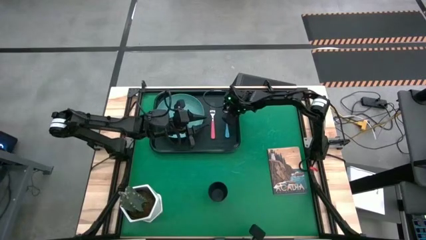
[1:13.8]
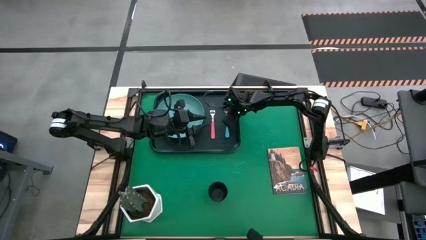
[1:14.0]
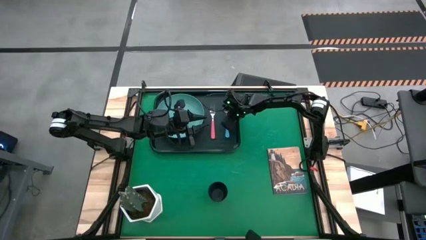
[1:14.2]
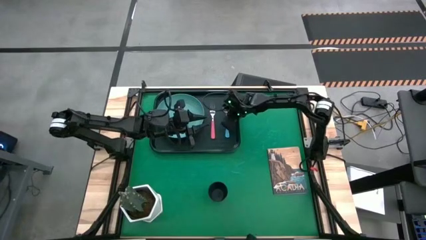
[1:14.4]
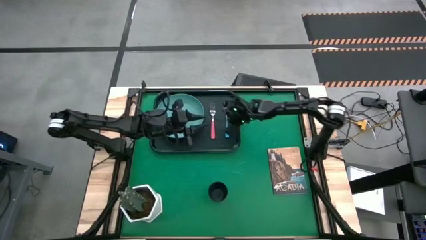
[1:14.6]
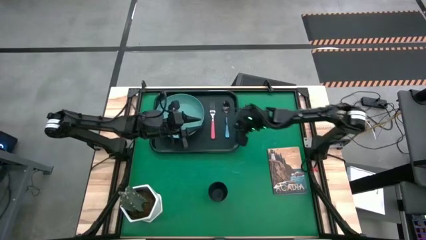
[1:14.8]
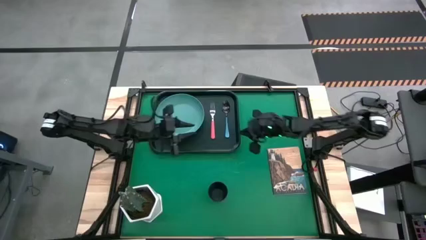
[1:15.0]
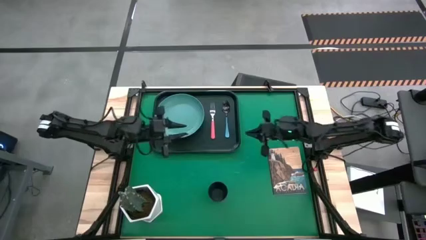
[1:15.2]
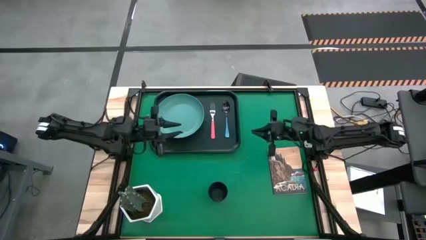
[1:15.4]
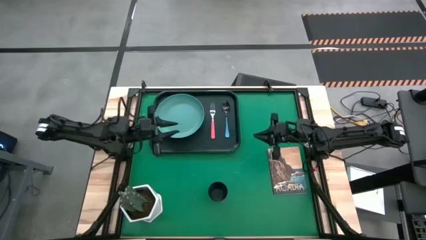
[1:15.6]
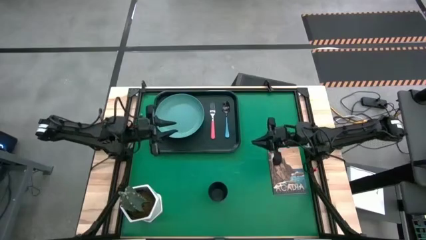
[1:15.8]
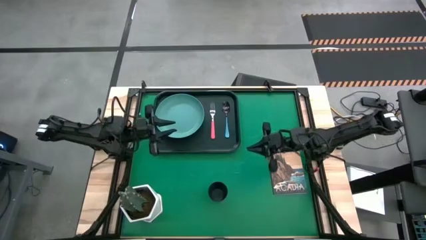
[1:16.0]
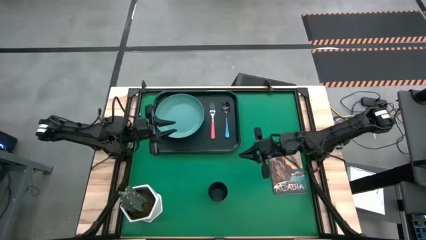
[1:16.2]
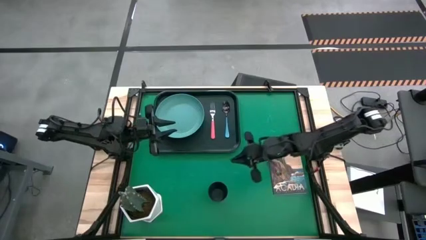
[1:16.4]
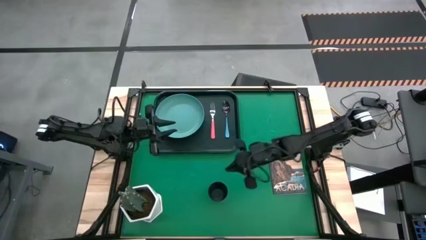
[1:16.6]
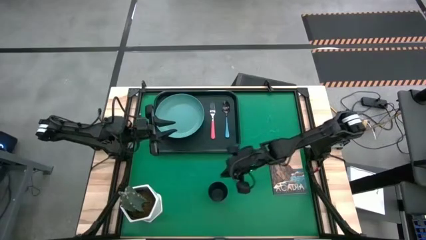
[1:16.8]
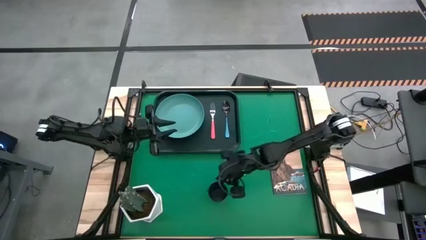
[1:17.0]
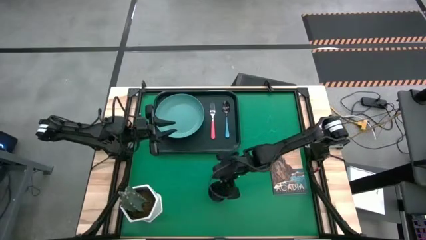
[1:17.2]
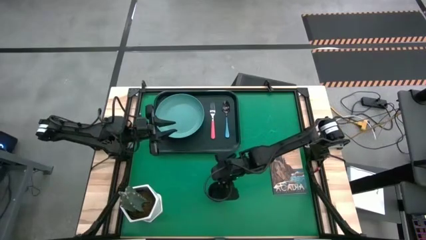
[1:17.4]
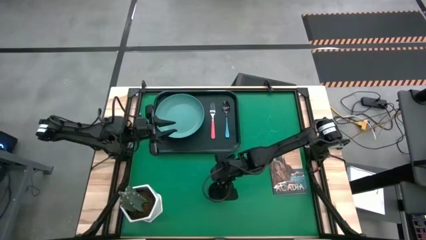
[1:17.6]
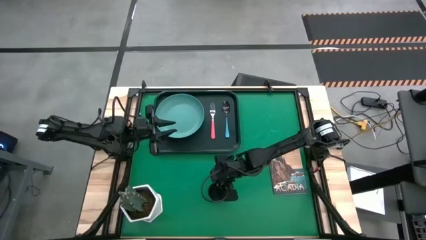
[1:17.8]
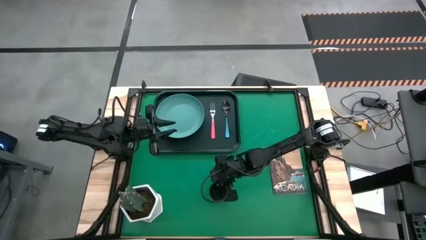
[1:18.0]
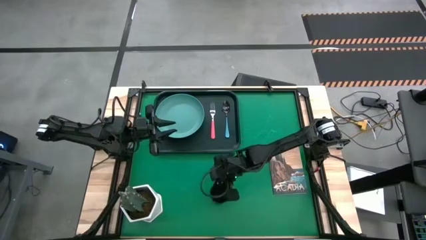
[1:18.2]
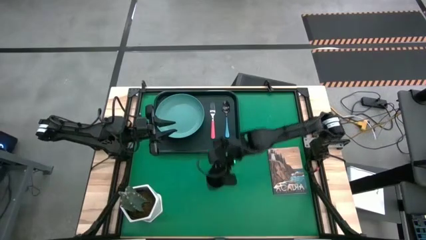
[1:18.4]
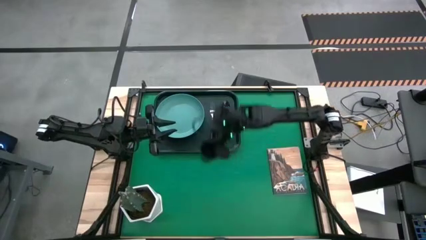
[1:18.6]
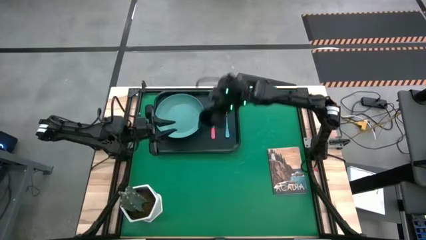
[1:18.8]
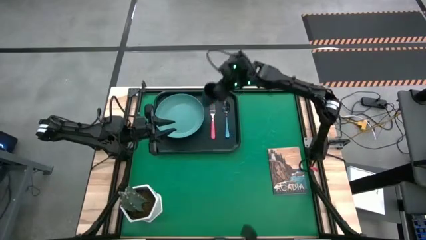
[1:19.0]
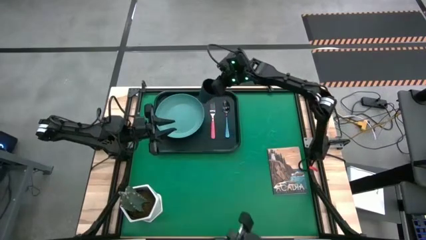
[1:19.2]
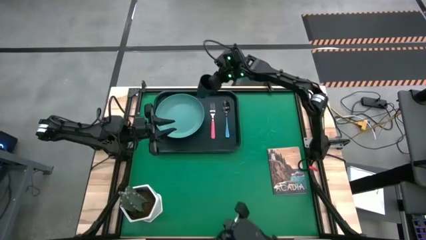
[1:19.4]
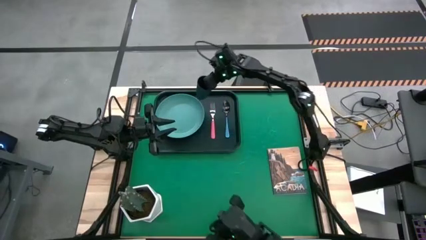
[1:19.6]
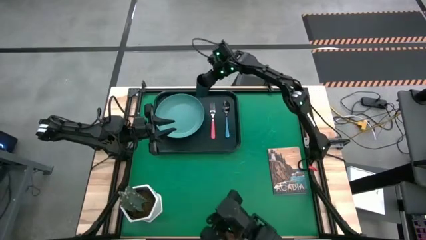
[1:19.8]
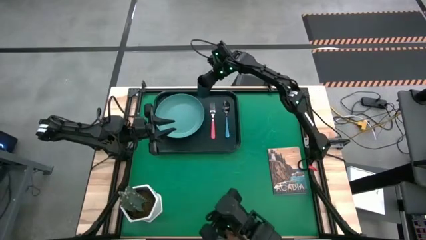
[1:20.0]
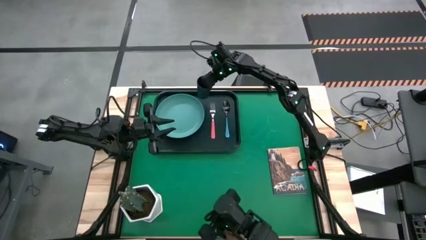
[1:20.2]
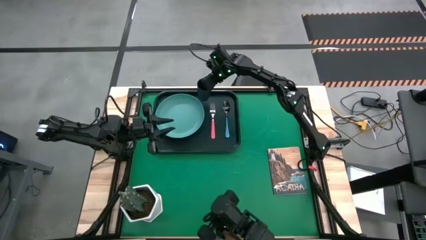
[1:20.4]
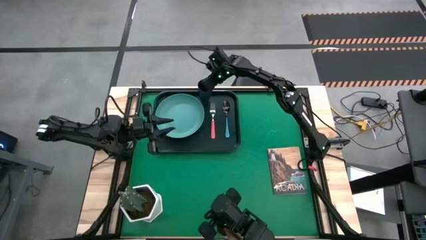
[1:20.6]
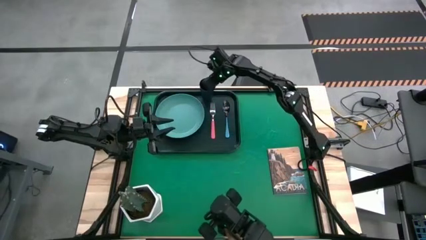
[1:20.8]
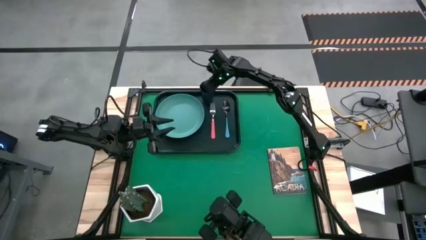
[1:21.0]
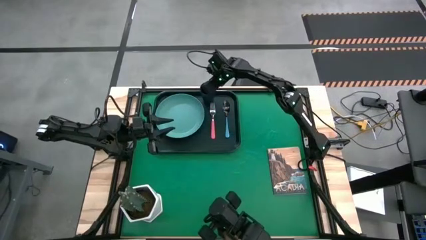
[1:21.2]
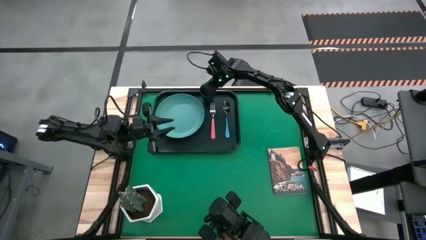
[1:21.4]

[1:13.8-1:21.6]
Task: Pick and place plate/cup/fork/spoon on tray
Put the dark blue cup on the black tray to the top right of the green plate

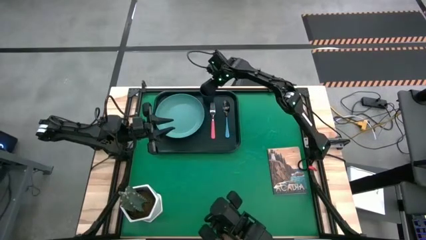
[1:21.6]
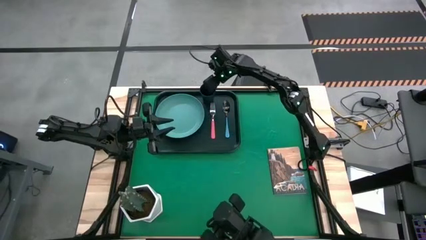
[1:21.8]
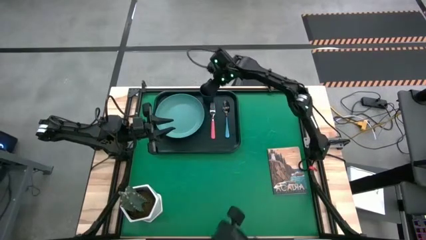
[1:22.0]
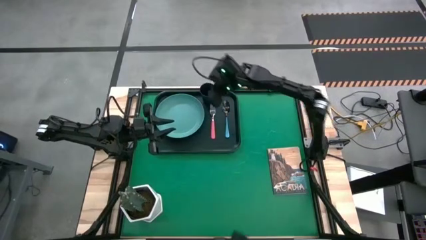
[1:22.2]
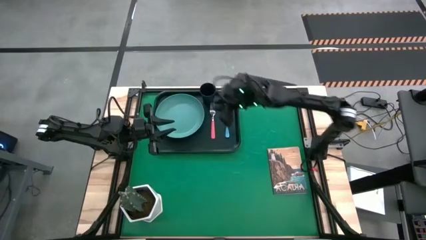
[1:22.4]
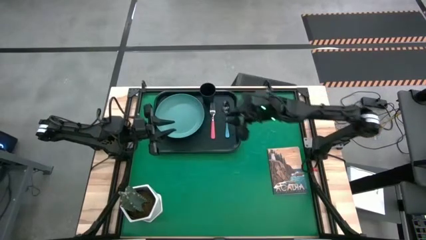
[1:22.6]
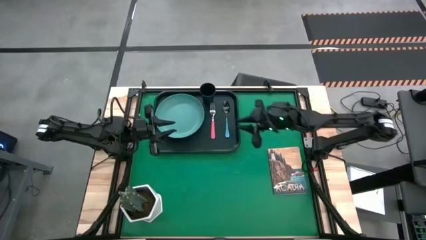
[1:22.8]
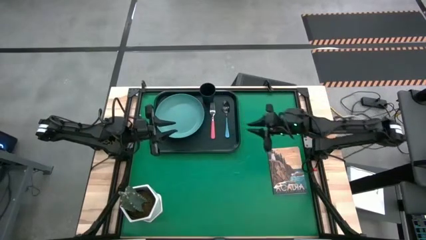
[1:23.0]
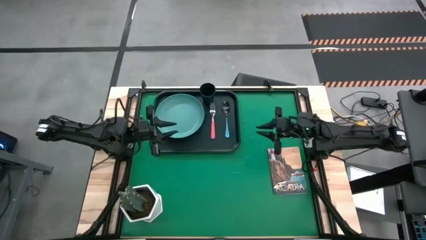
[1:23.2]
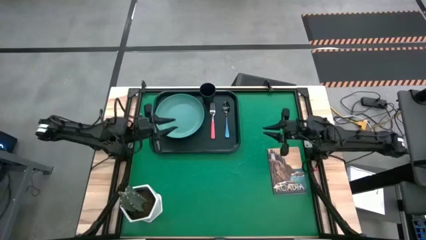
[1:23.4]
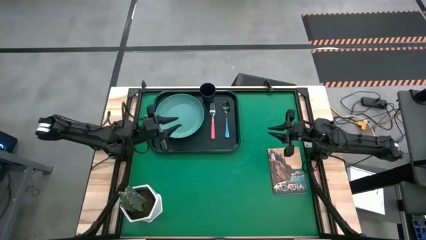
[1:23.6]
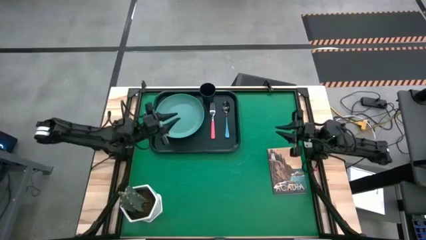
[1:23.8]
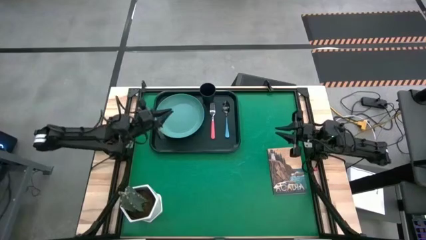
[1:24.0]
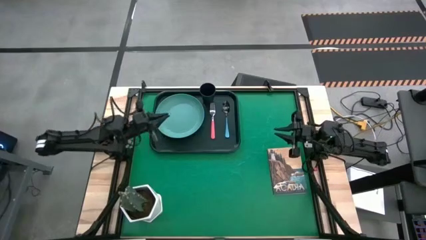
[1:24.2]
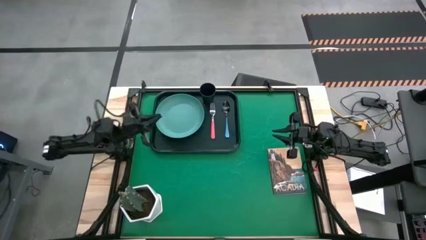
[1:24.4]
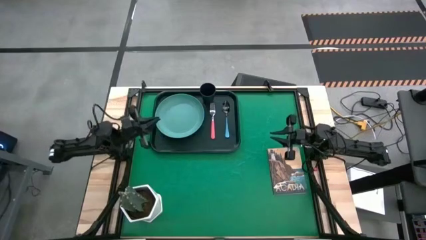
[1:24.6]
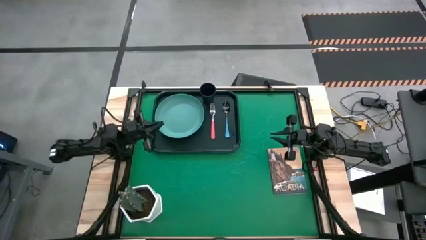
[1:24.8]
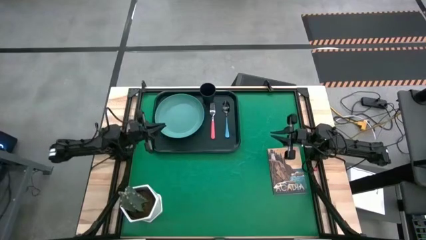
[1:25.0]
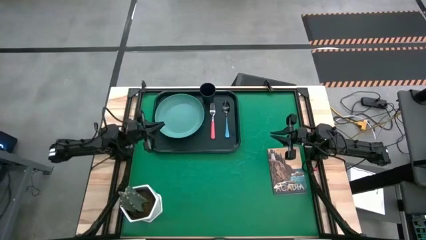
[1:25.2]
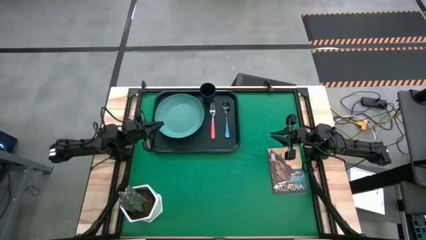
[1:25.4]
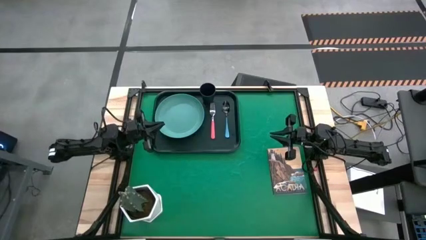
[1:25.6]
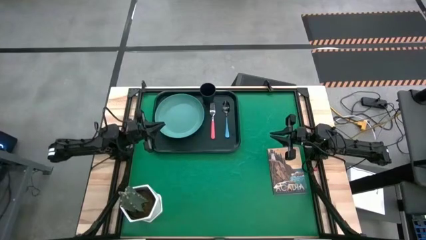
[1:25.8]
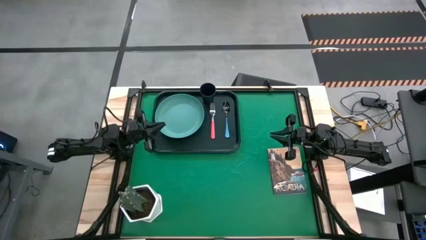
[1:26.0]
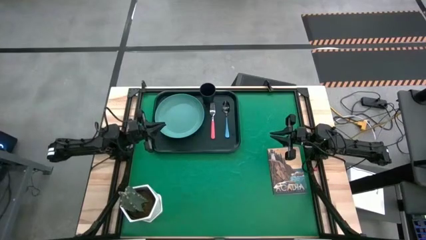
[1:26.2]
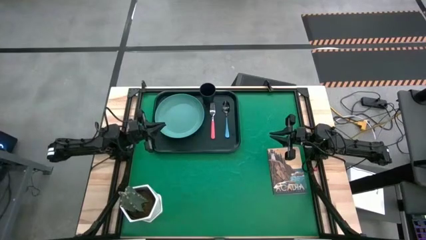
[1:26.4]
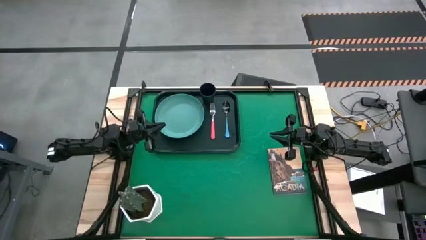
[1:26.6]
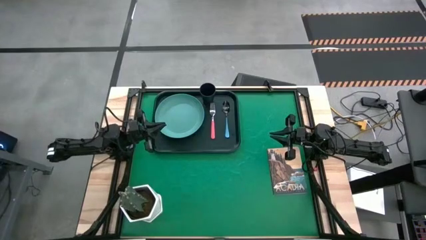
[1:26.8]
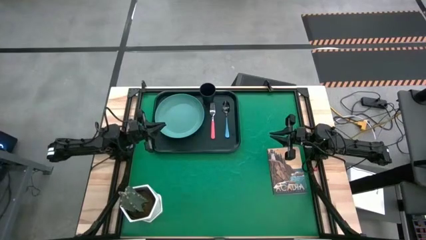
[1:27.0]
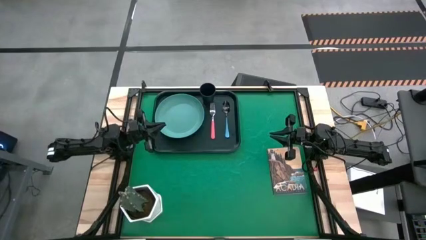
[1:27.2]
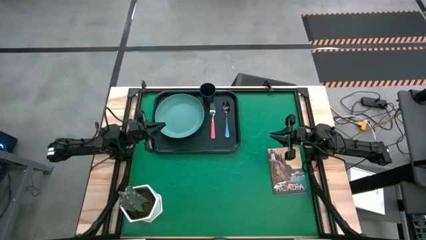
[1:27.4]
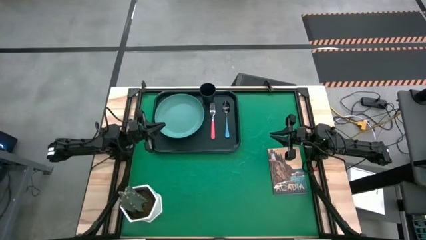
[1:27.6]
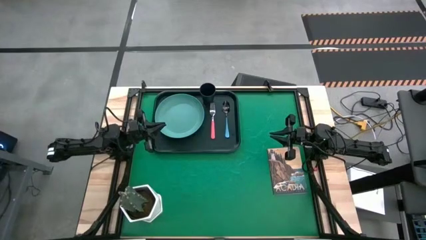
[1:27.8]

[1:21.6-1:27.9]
Return to Home Position
